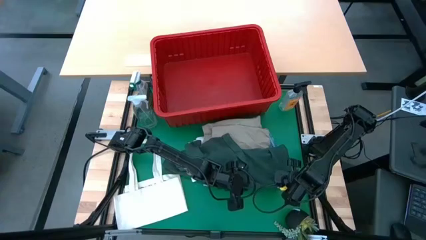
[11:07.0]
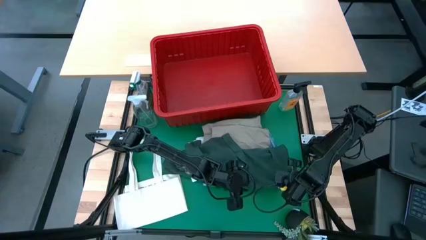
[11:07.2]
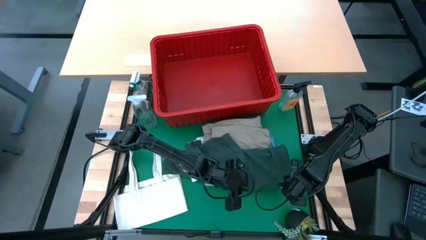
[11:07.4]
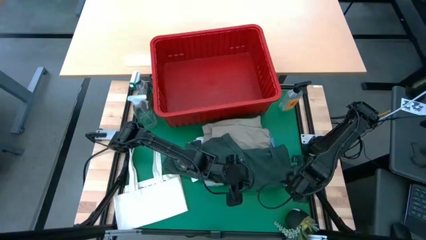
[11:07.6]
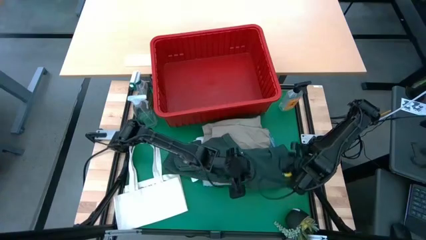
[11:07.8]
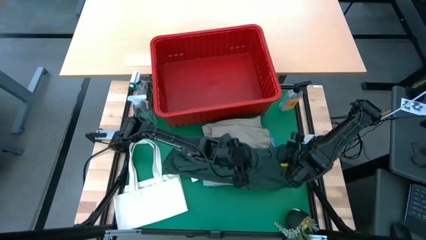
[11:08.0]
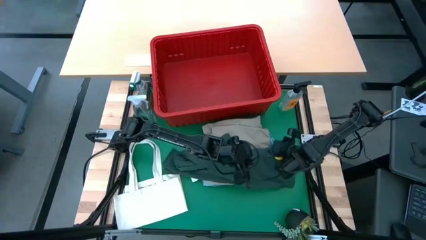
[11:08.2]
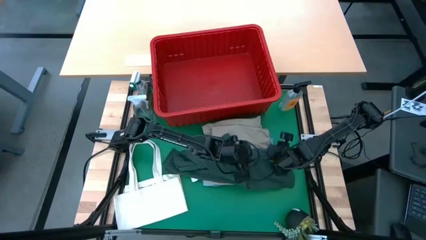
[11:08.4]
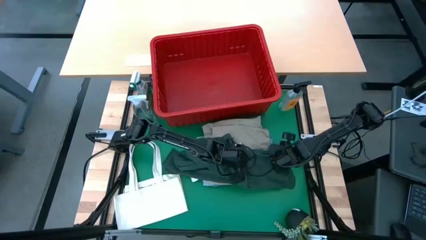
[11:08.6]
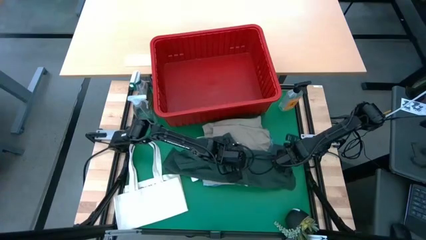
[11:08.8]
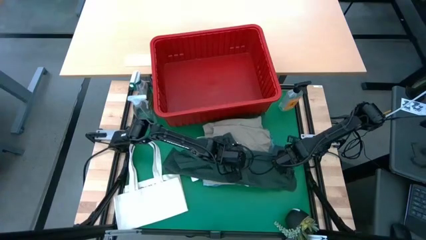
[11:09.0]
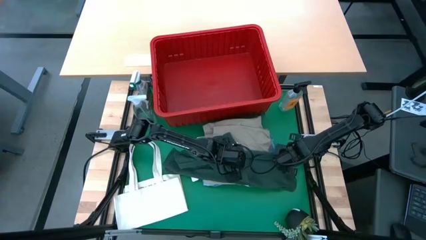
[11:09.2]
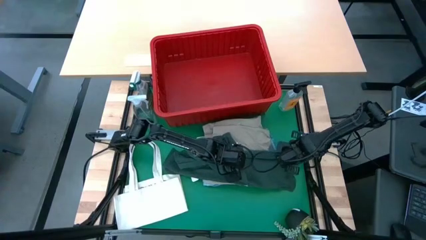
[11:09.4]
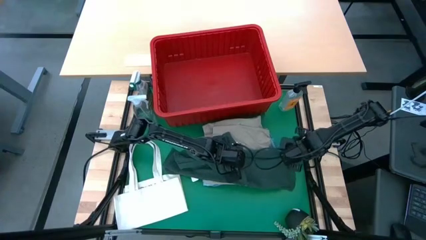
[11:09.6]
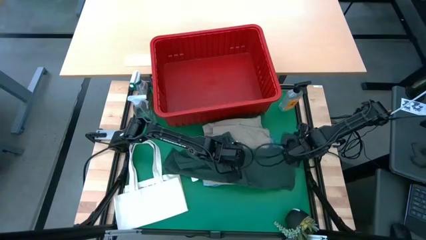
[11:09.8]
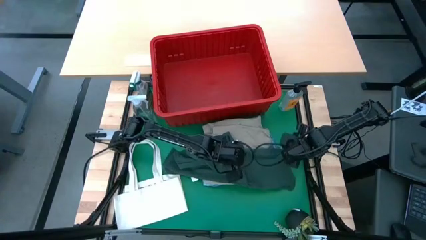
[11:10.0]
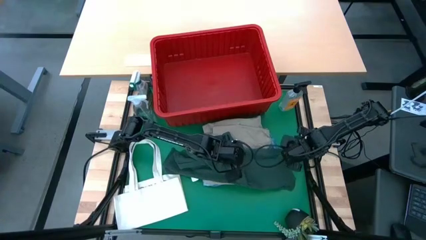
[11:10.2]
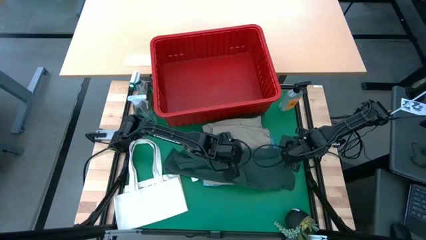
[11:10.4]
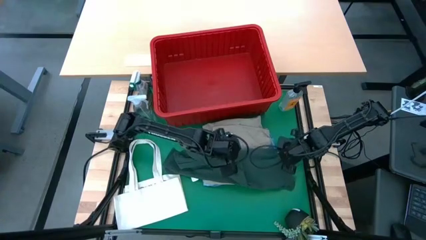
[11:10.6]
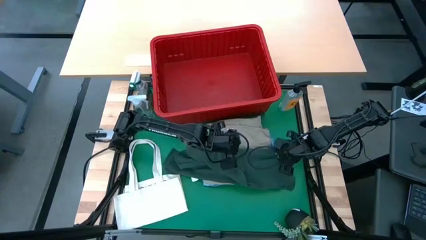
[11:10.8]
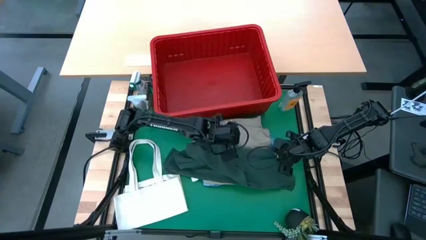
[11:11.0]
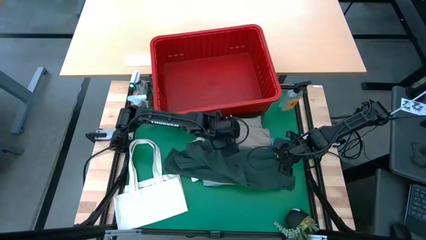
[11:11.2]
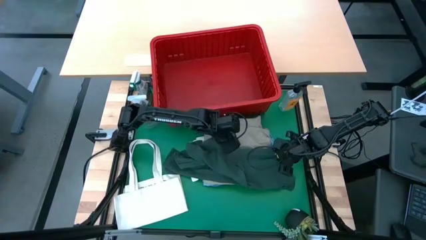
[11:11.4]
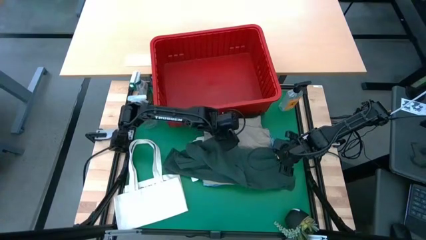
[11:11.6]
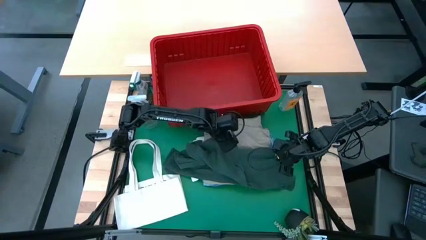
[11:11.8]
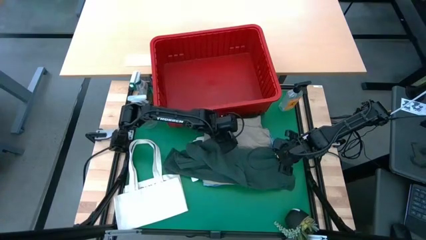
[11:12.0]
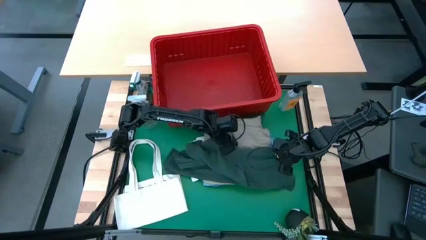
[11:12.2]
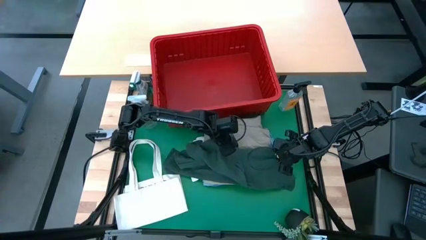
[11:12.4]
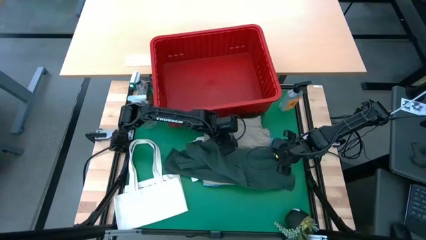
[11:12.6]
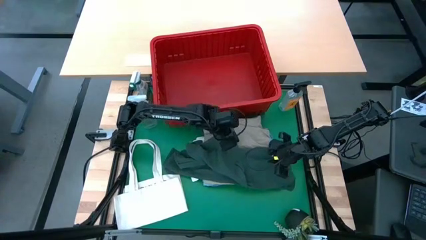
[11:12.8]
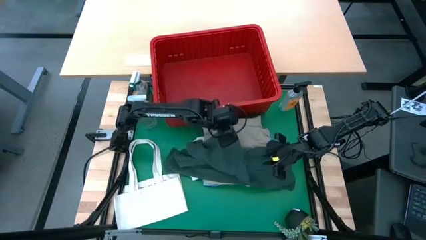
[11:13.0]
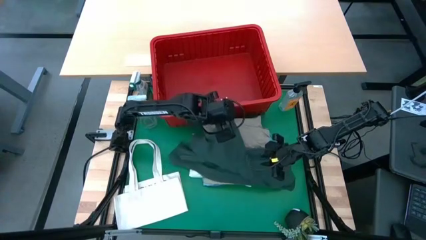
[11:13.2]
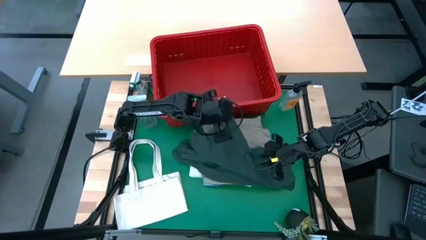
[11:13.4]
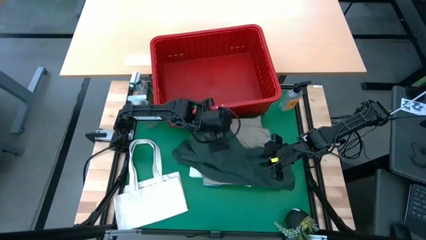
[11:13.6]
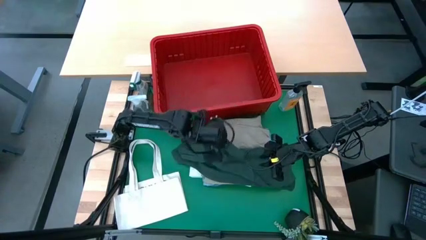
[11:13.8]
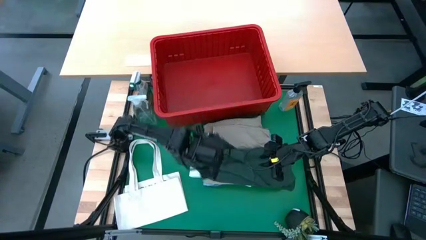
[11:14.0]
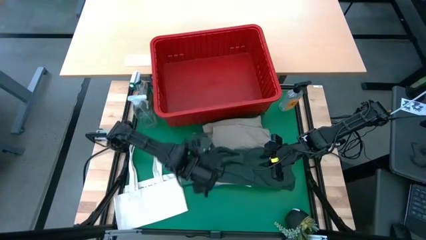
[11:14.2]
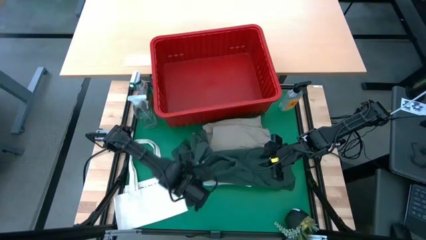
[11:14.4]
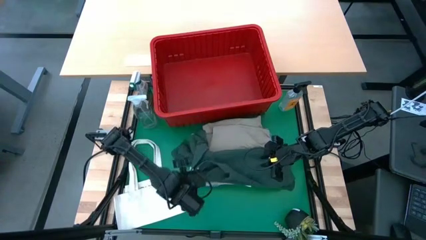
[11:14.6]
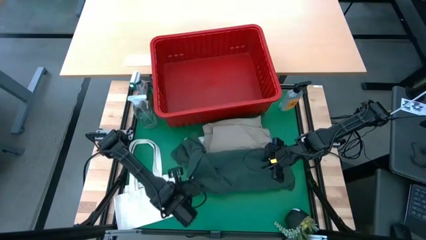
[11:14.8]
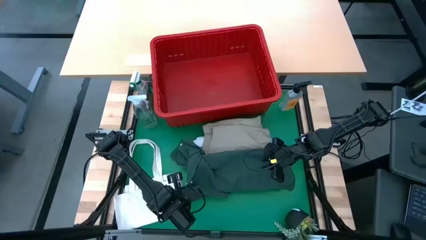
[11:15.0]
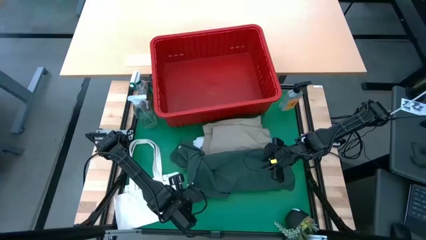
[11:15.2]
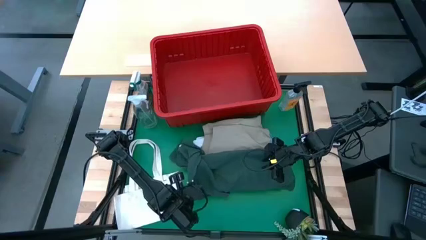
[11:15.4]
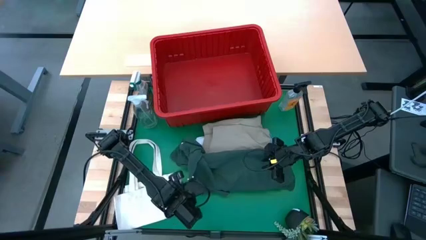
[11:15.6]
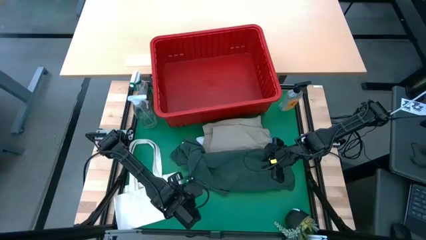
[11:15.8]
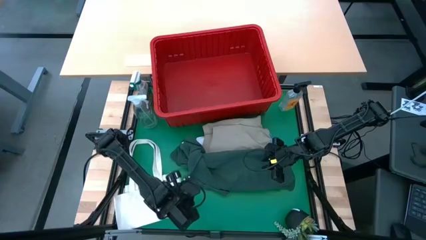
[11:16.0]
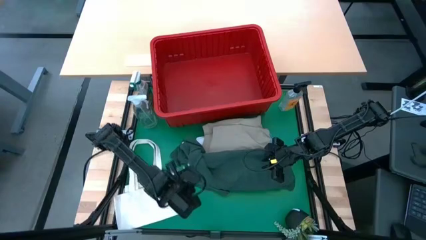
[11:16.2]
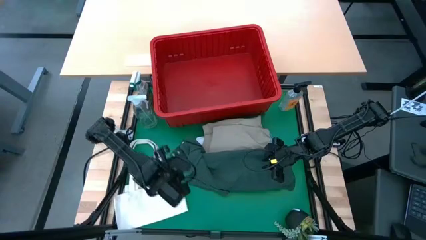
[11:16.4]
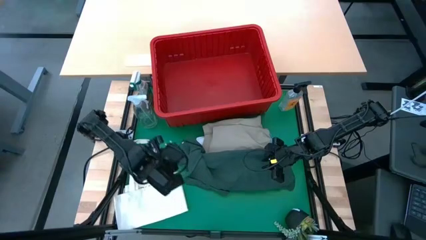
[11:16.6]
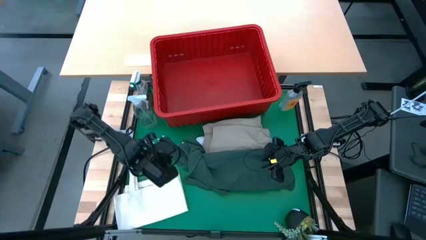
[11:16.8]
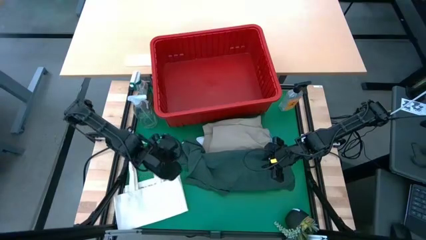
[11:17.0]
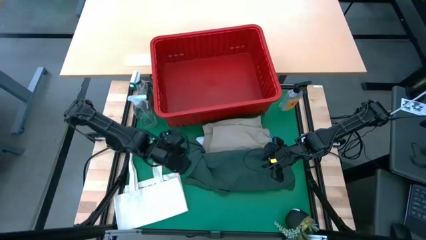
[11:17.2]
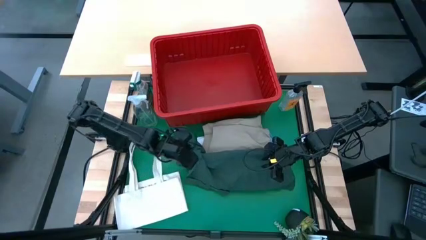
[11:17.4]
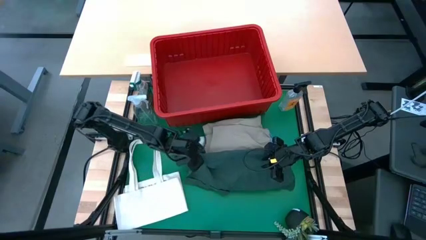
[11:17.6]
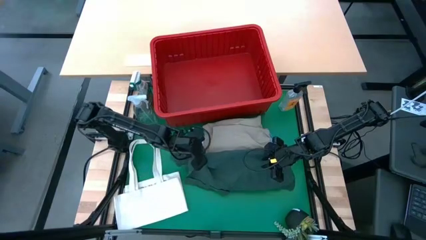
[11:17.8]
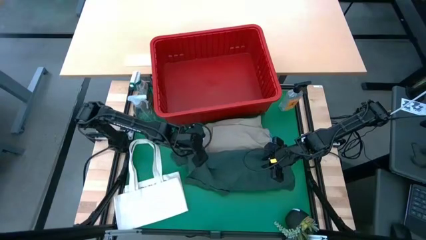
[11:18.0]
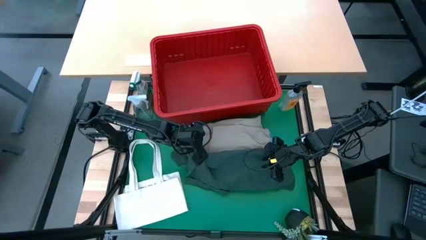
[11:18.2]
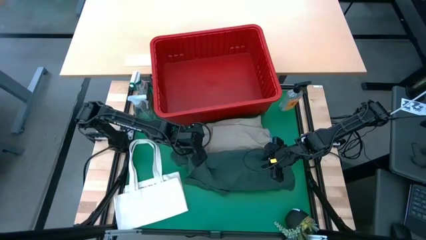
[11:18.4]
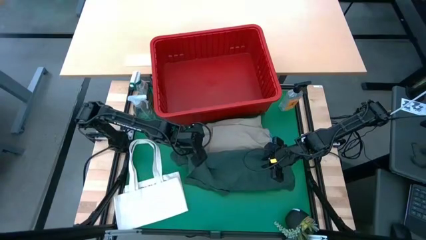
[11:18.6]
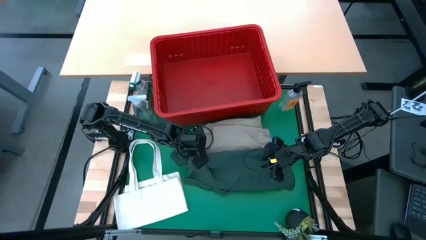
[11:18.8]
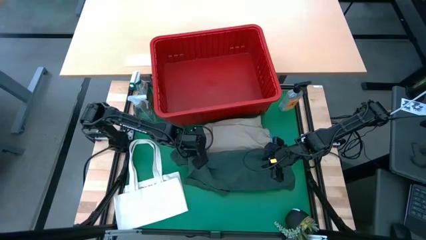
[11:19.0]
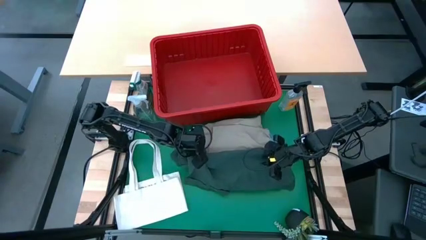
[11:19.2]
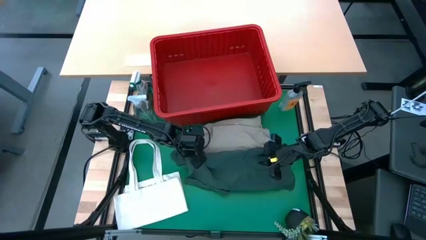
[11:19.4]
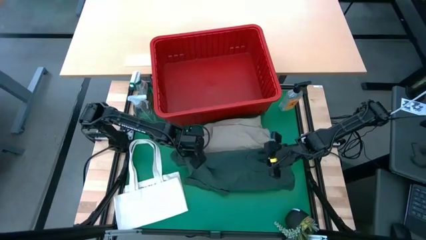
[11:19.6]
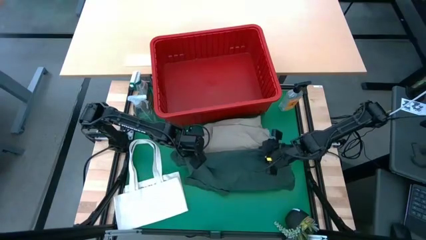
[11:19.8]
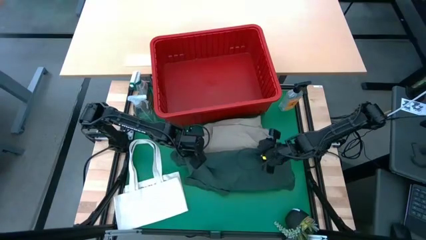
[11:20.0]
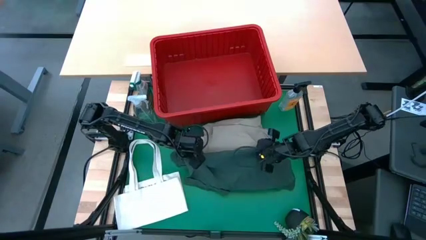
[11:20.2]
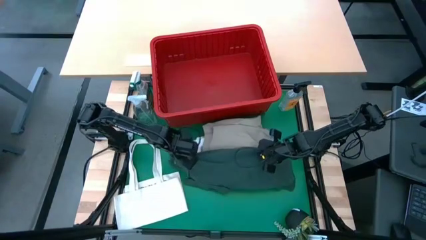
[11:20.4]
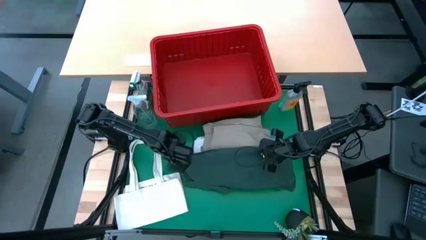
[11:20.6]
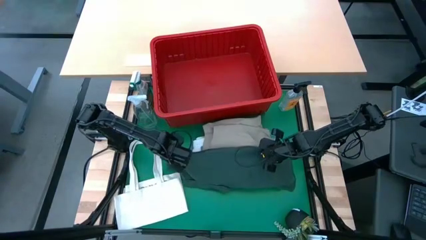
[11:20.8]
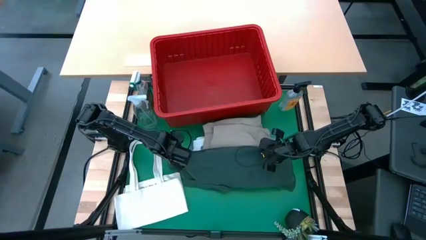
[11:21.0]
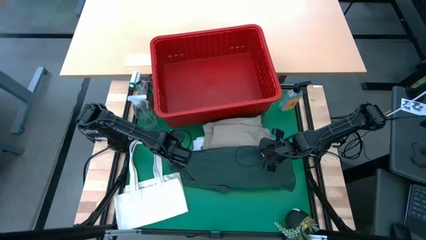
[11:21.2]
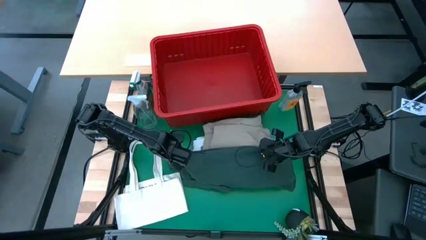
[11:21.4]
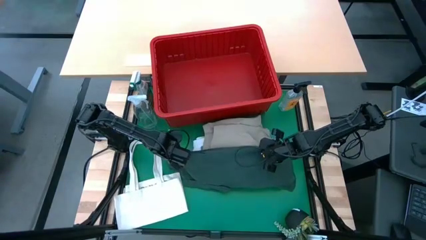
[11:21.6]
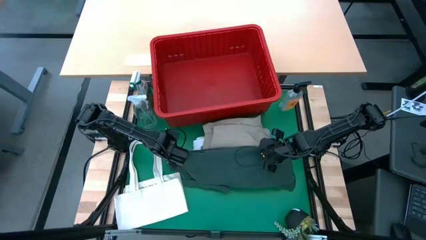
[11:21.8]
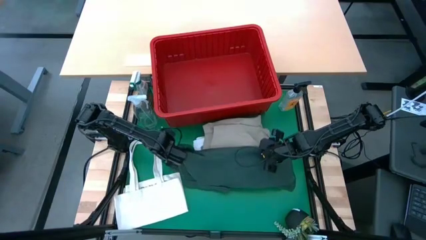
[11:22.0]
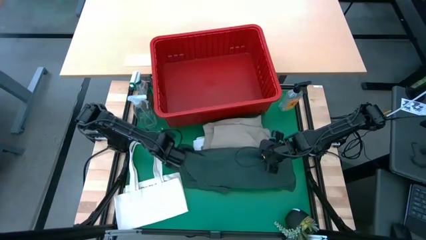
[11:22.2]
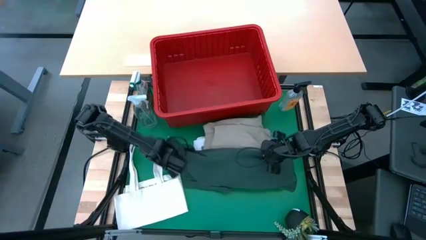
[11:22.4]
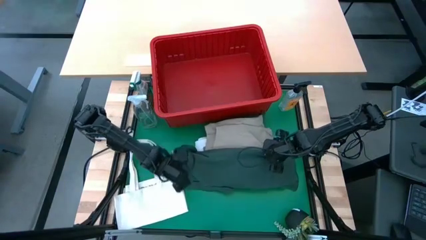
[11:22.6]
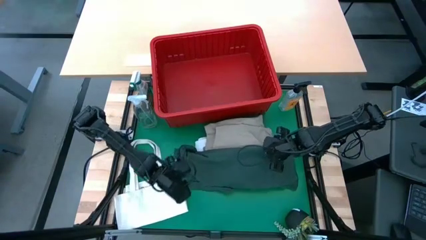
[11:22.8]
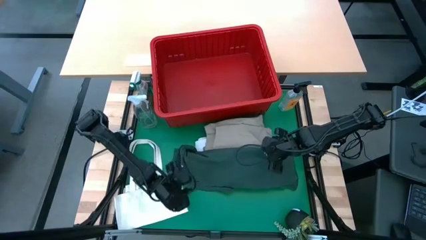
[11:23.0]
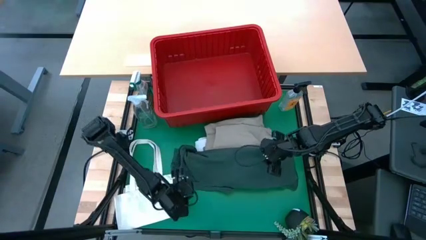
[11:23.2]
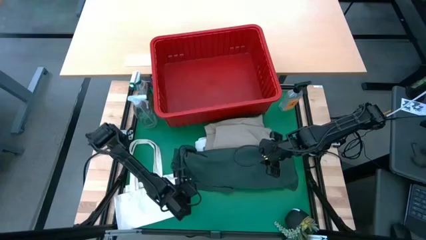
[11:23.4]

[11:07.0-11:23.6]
Task: Fold Laundry from Bin
Fold the green polo shirt
